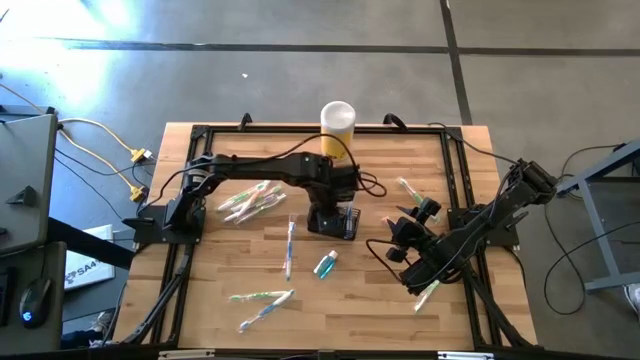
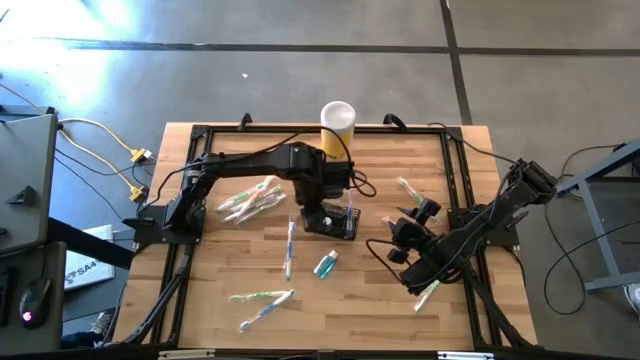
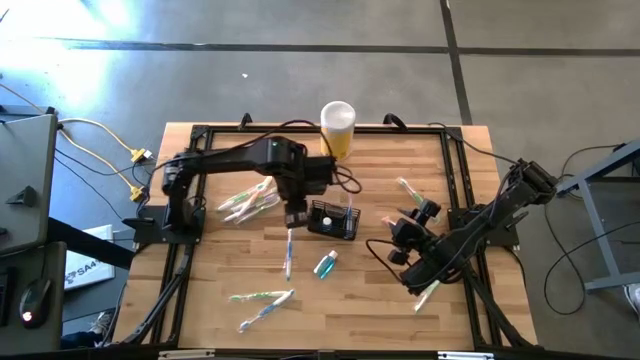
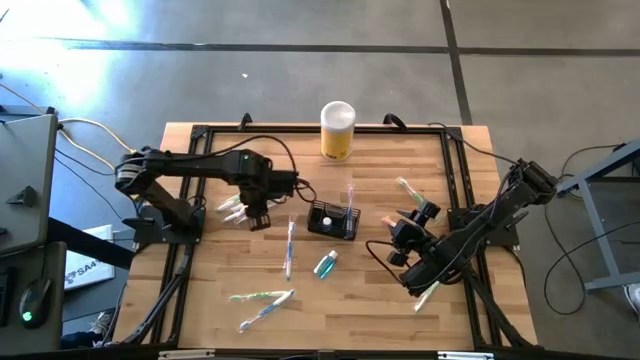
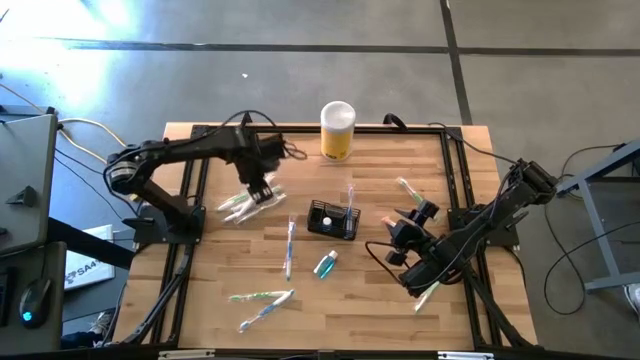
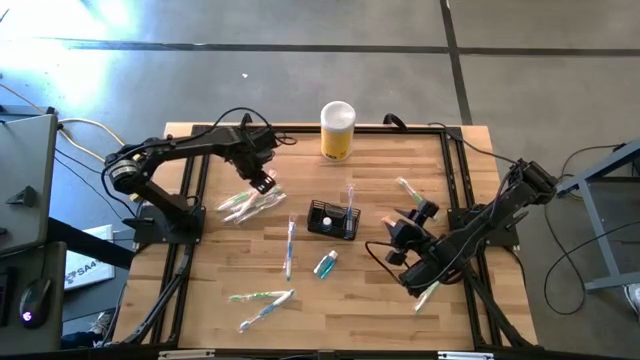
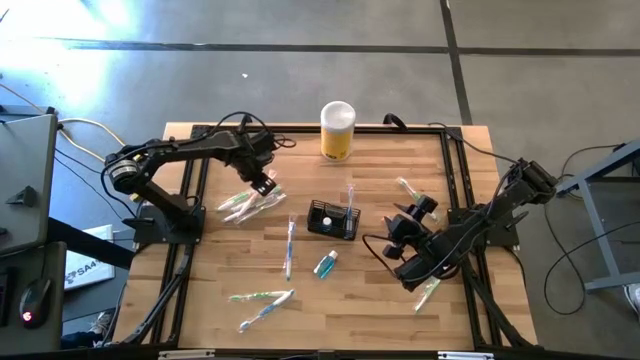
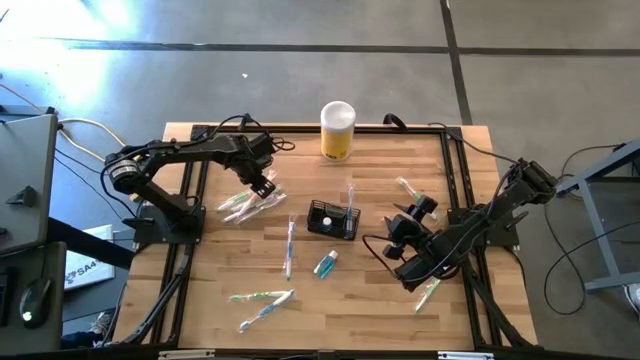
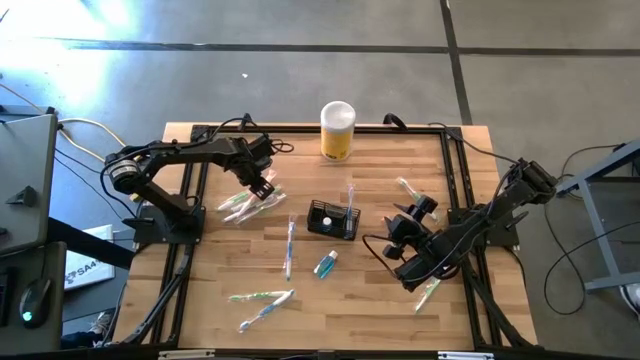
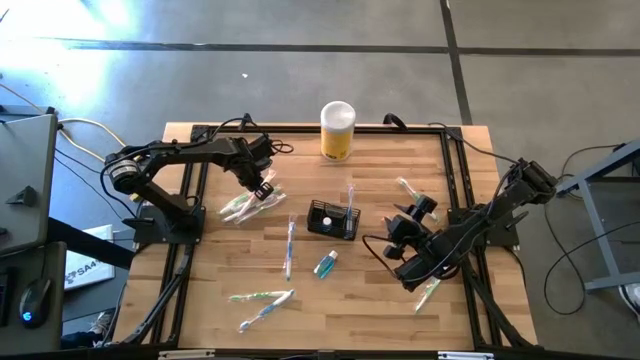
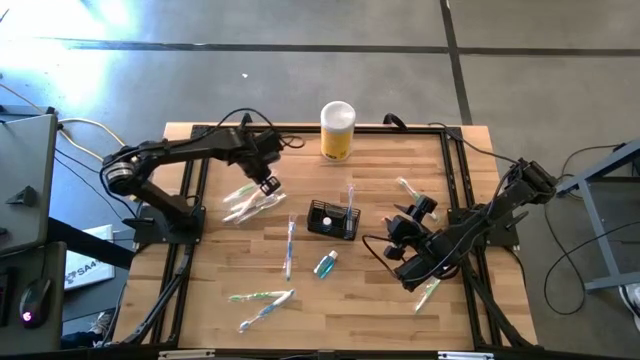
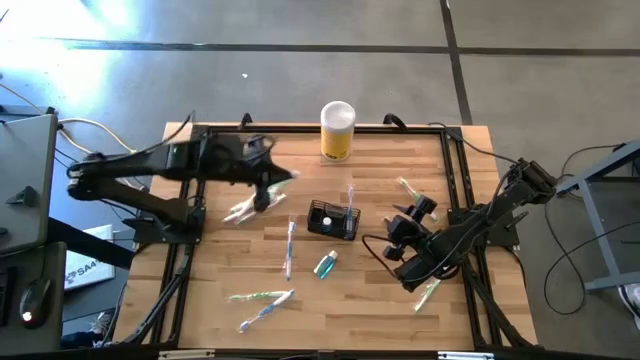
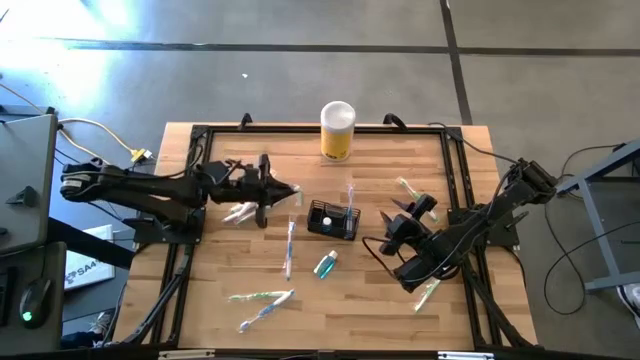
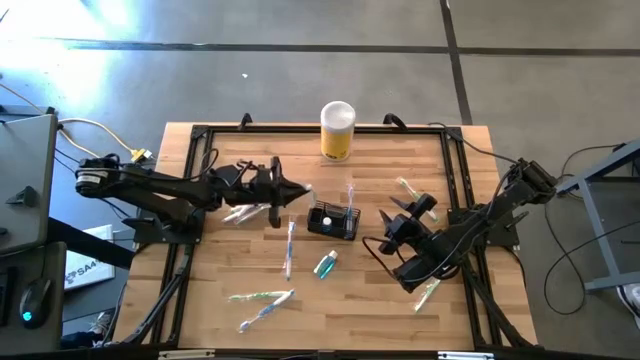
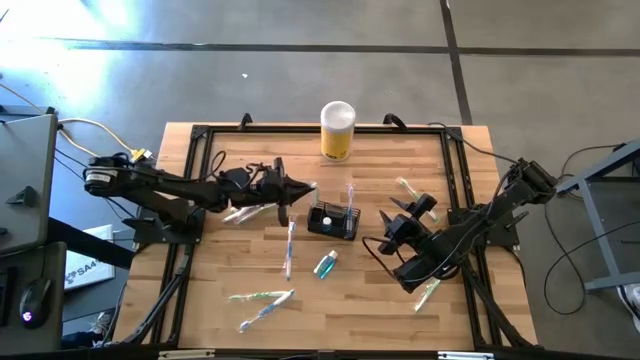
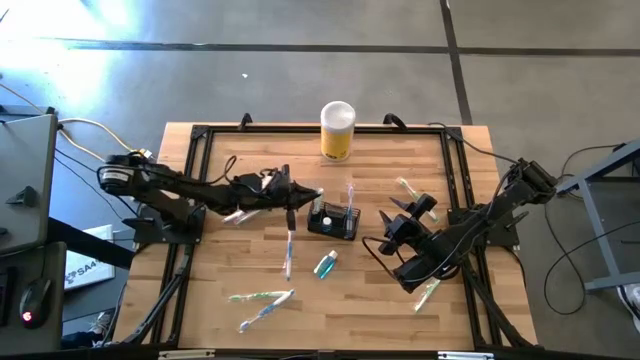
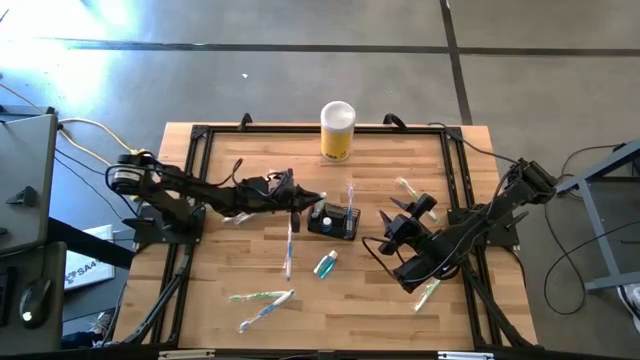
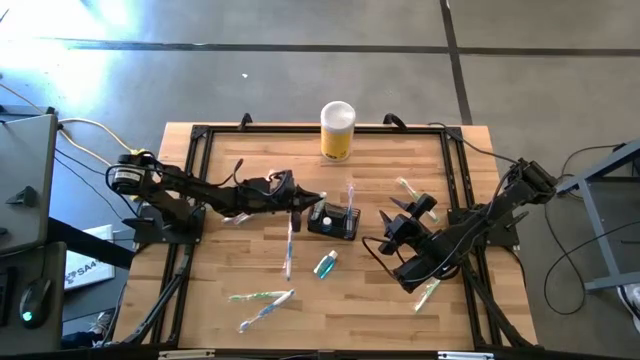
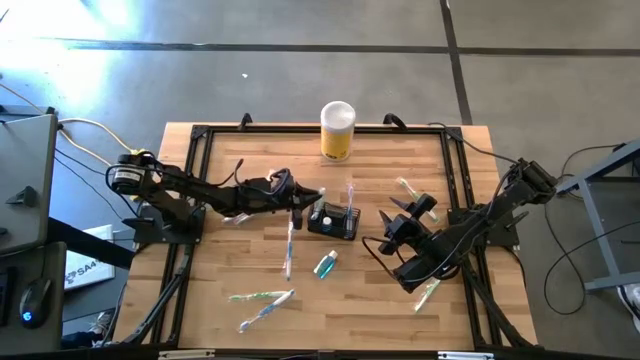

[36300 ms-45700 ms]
Task: Pick & Place toothbrushing station
Put the green toothbrush into the wire organizer

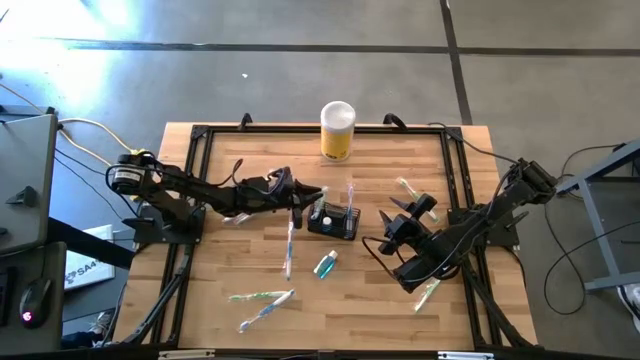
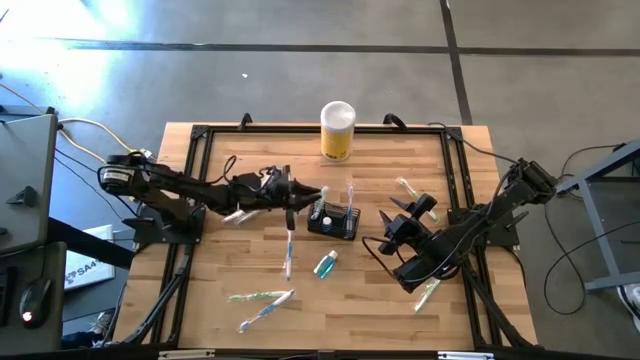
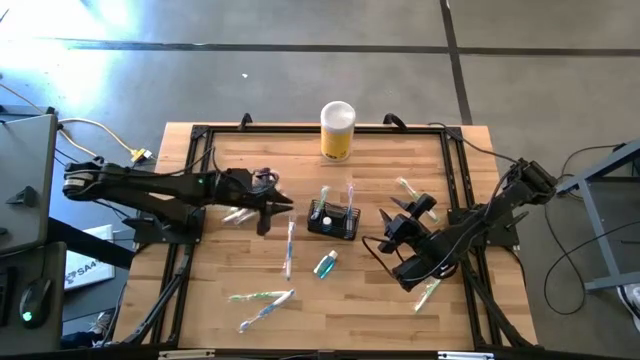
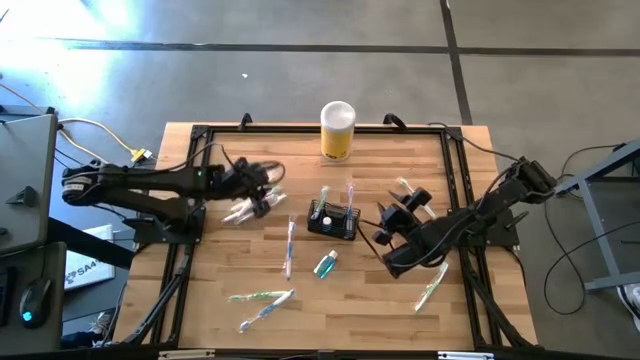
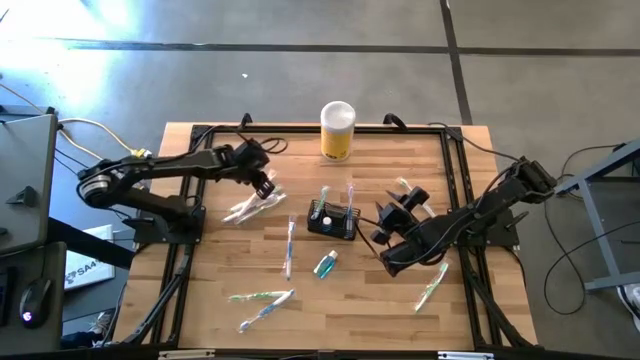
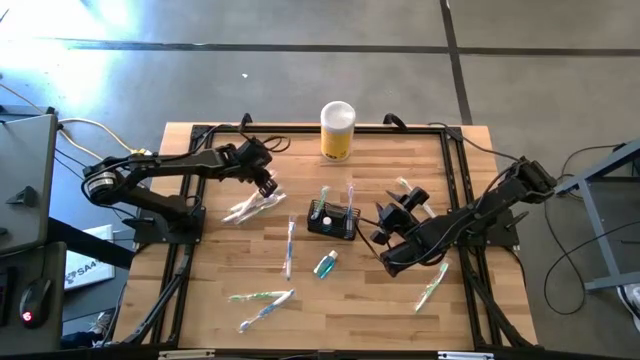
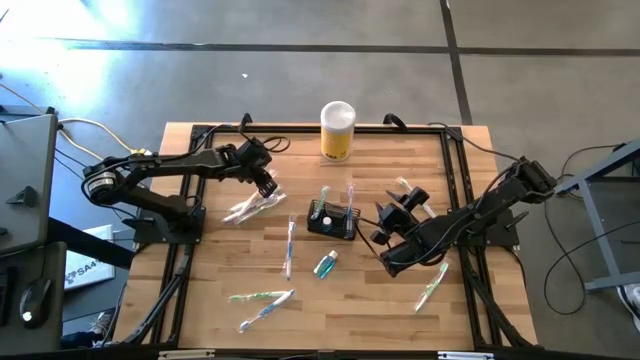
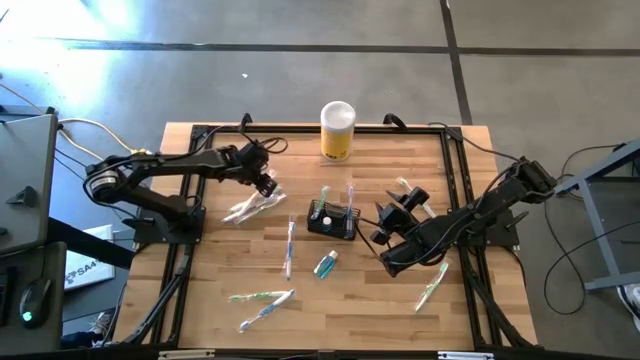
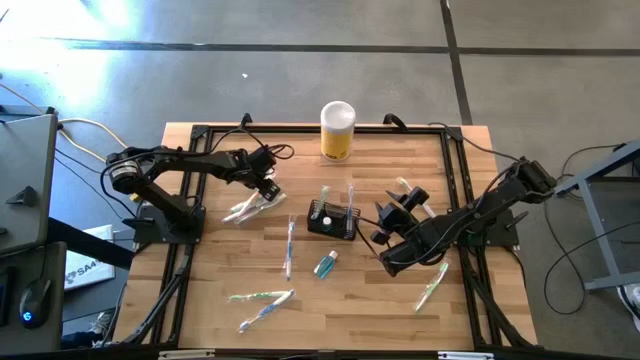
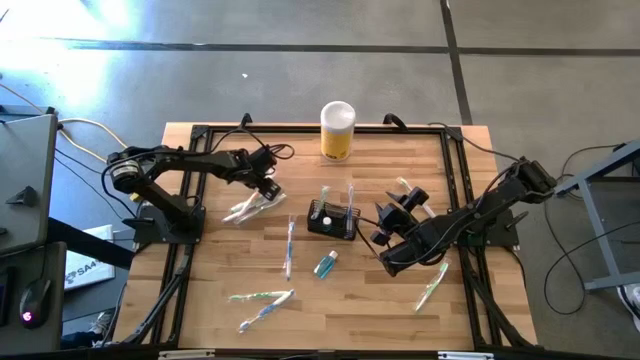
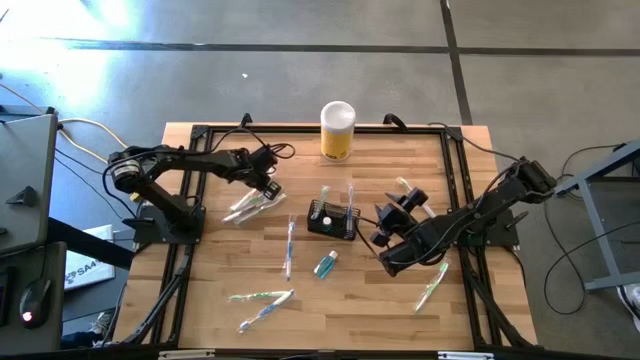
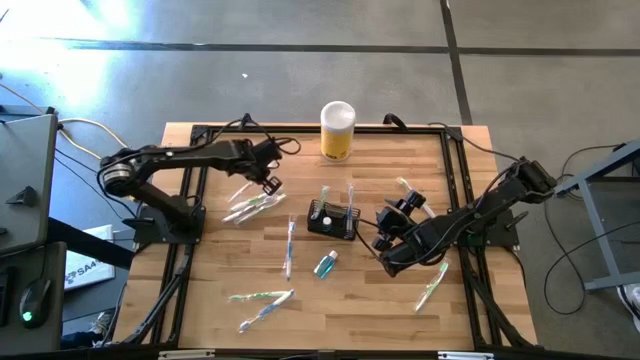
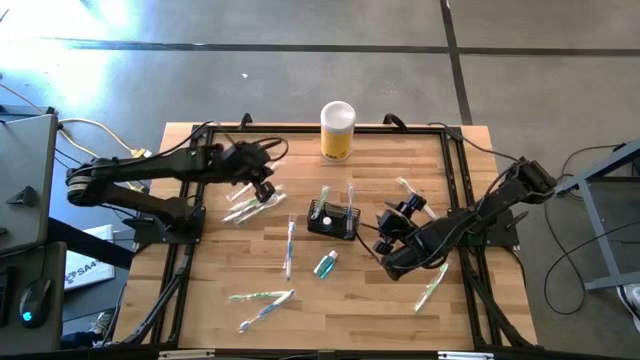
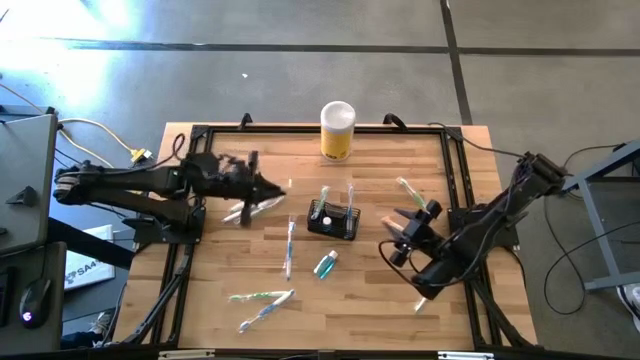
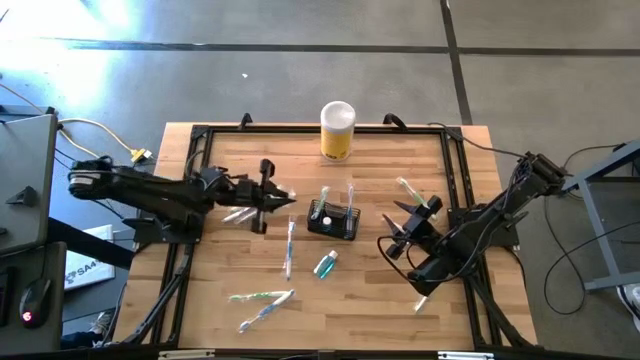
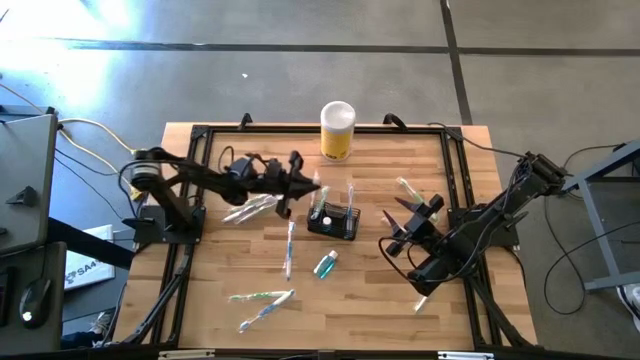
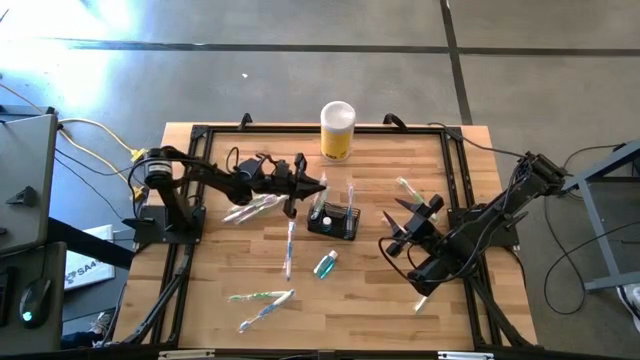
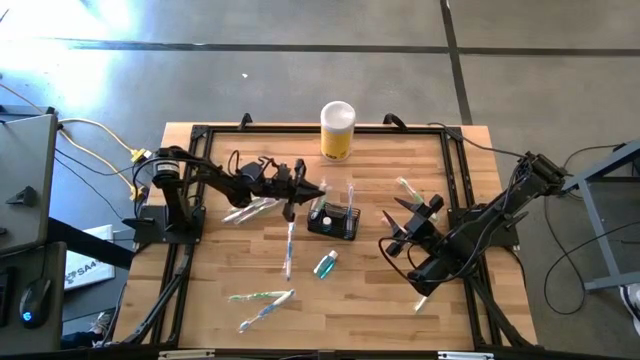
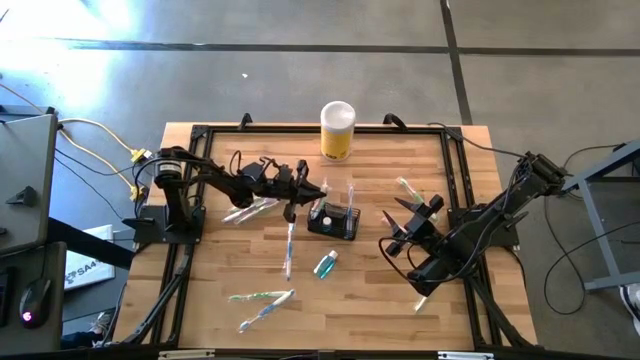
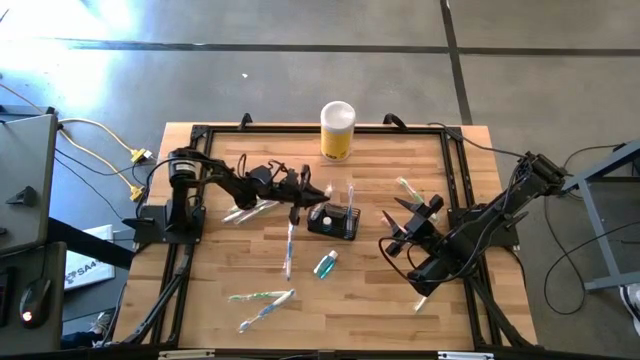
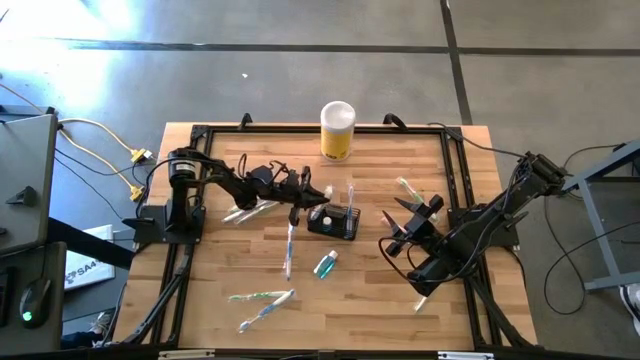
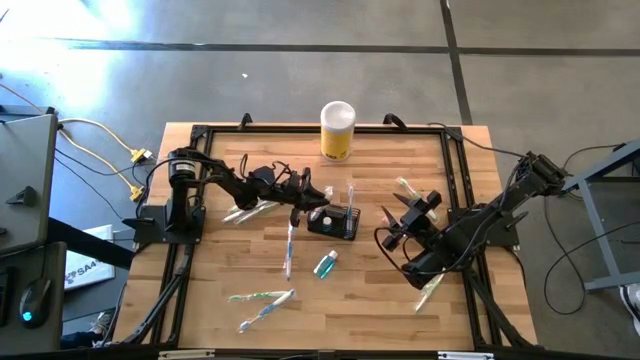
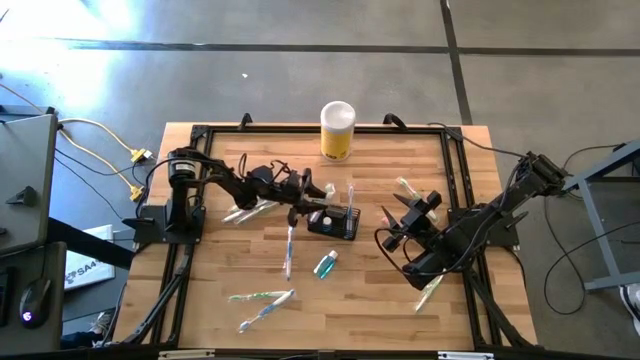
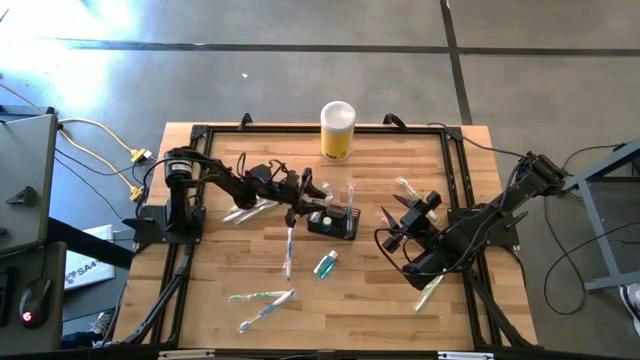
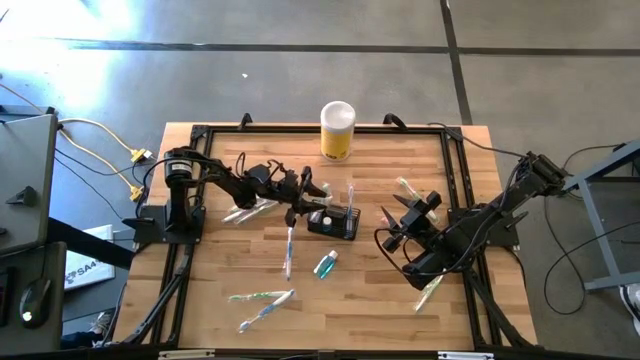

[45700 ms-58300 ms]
Put the orange toothbrush into the wire organizer
